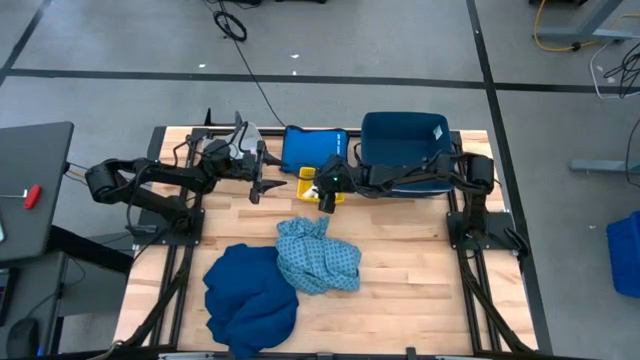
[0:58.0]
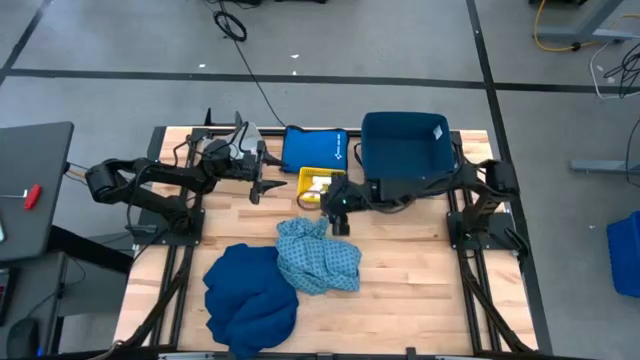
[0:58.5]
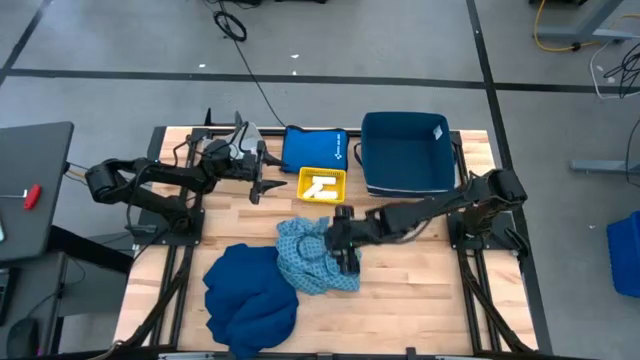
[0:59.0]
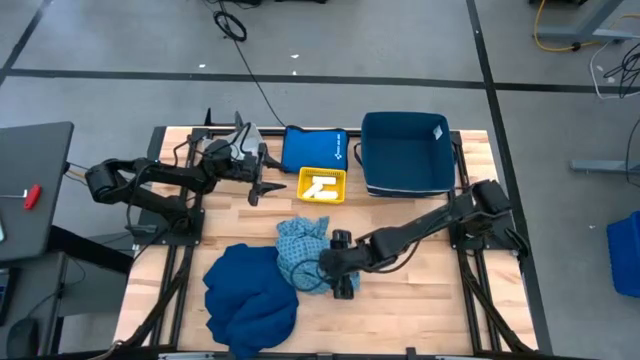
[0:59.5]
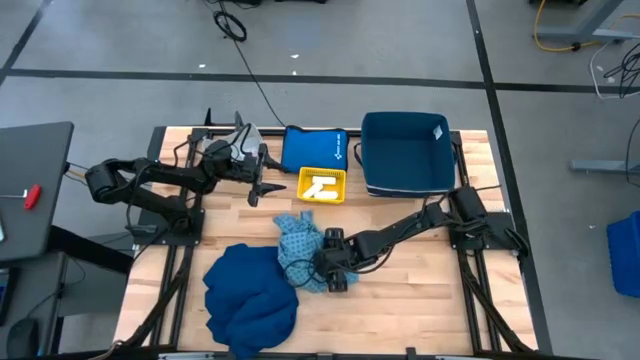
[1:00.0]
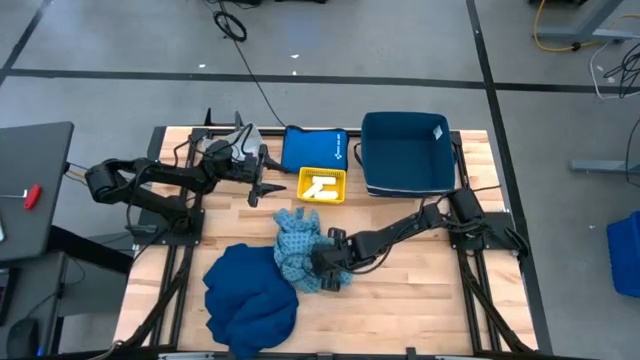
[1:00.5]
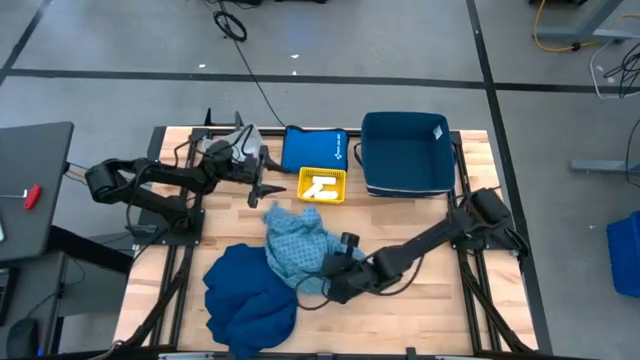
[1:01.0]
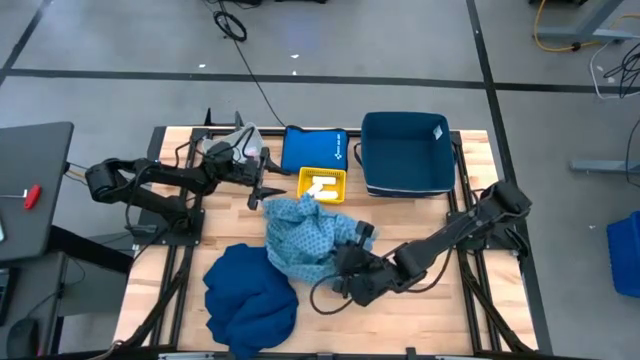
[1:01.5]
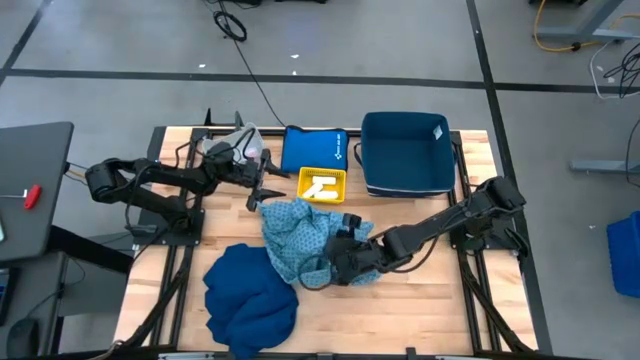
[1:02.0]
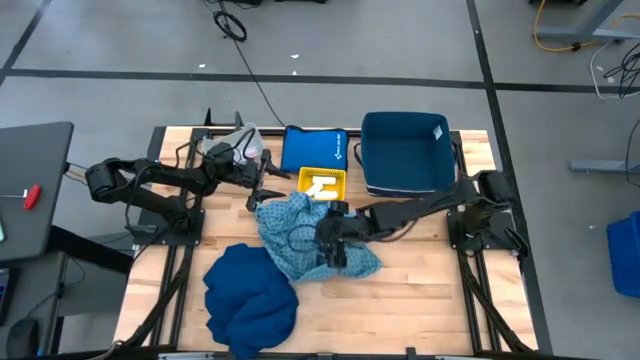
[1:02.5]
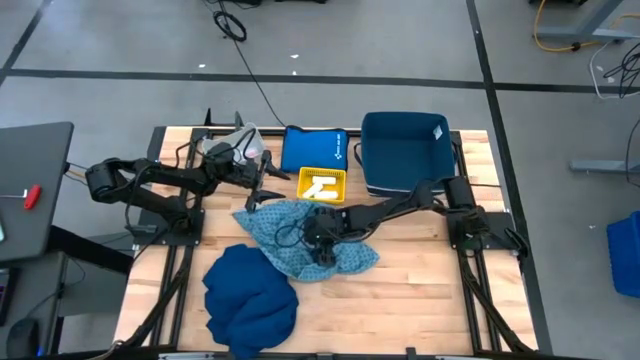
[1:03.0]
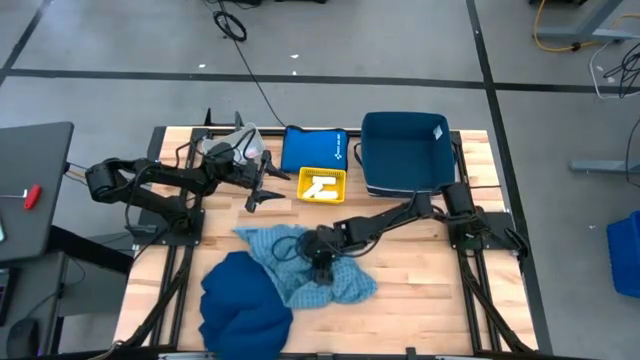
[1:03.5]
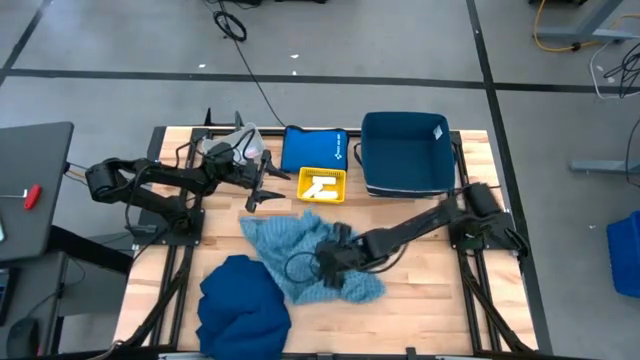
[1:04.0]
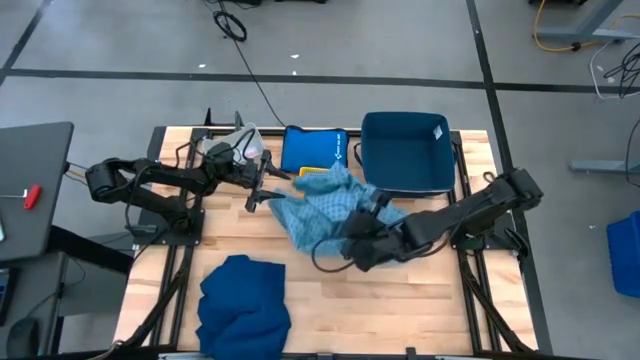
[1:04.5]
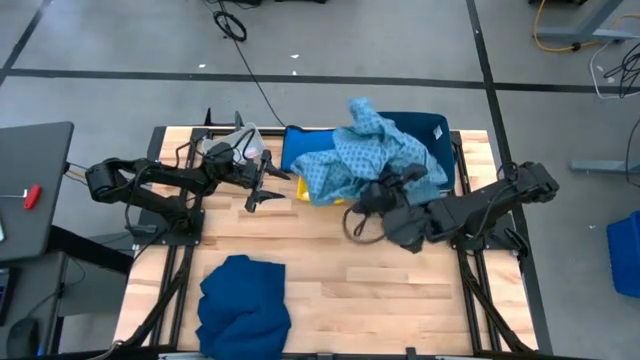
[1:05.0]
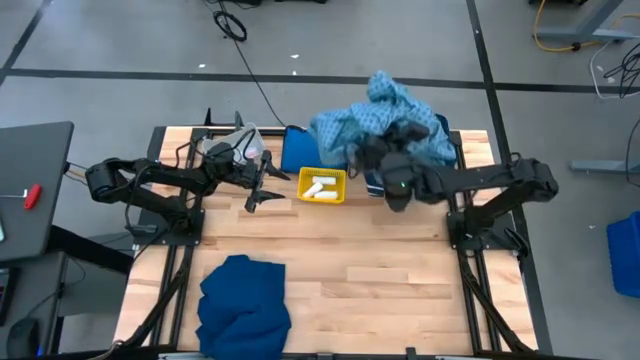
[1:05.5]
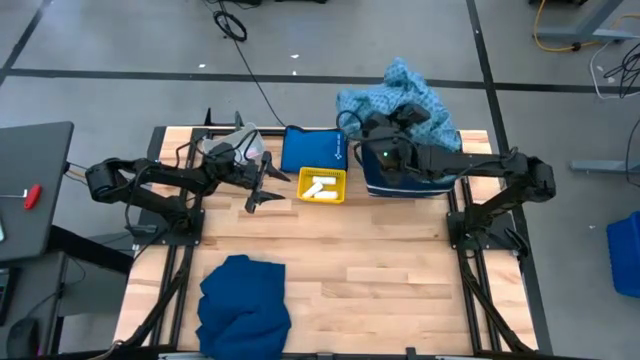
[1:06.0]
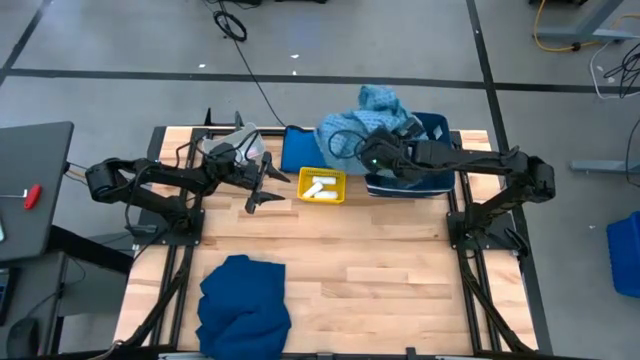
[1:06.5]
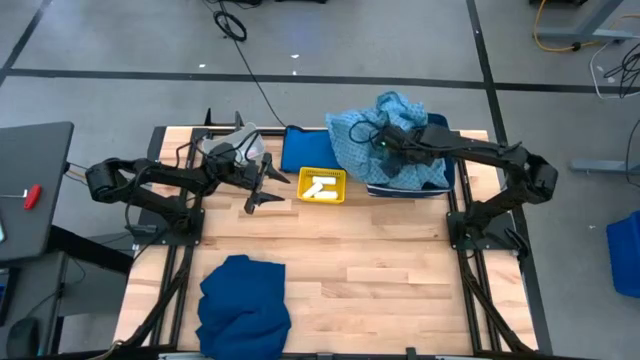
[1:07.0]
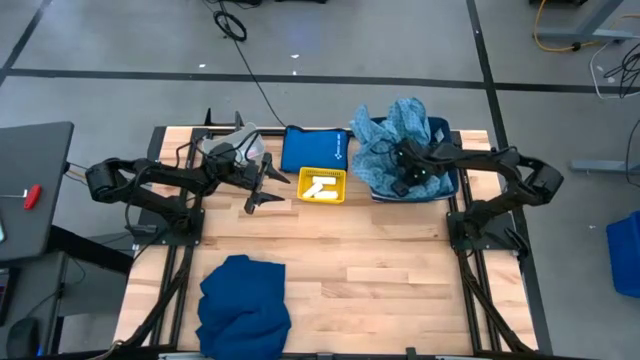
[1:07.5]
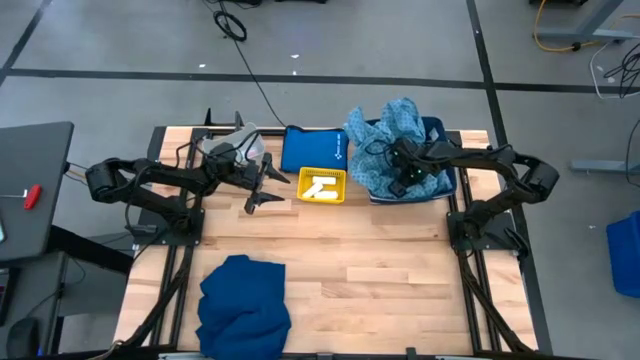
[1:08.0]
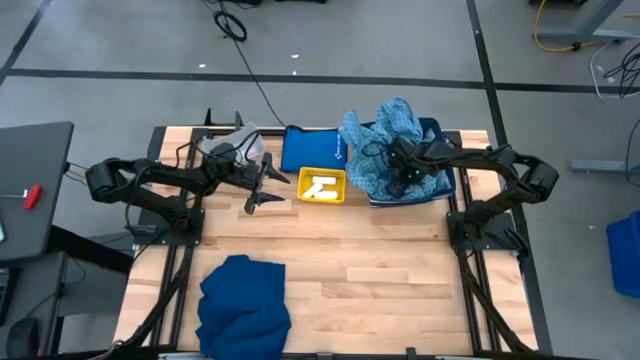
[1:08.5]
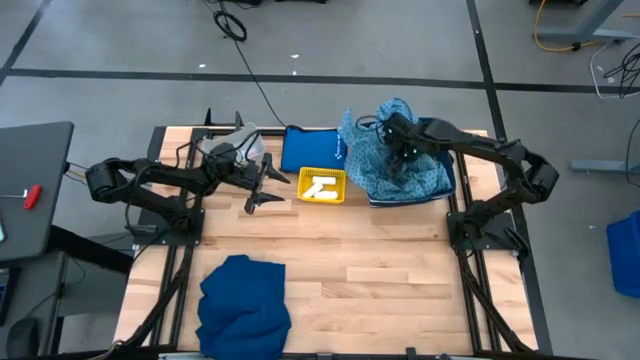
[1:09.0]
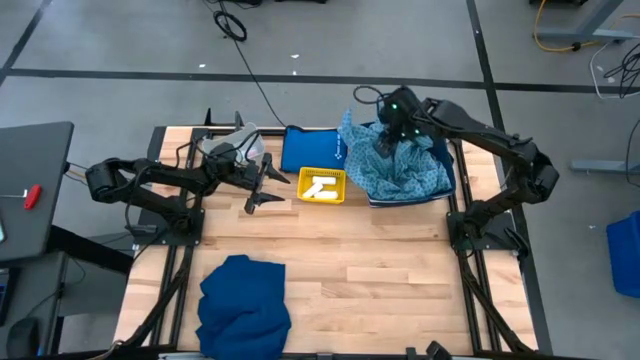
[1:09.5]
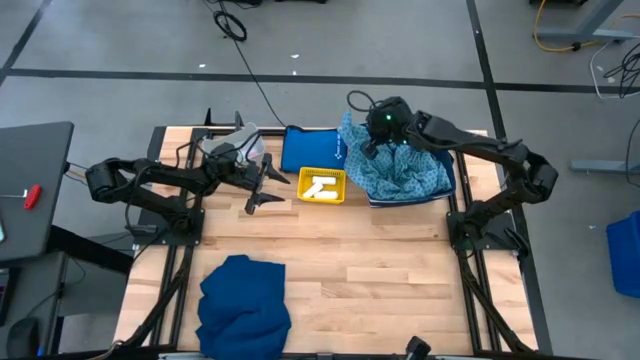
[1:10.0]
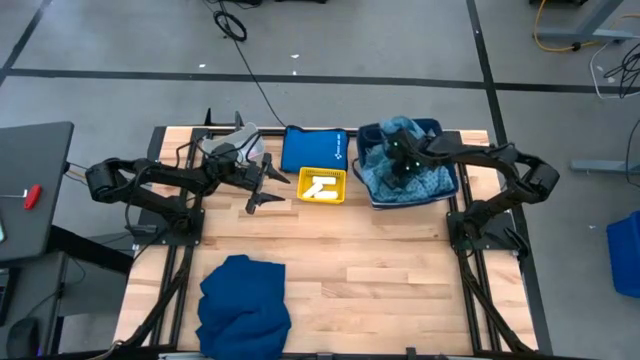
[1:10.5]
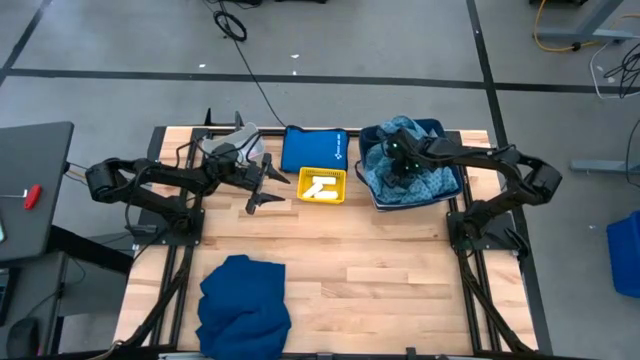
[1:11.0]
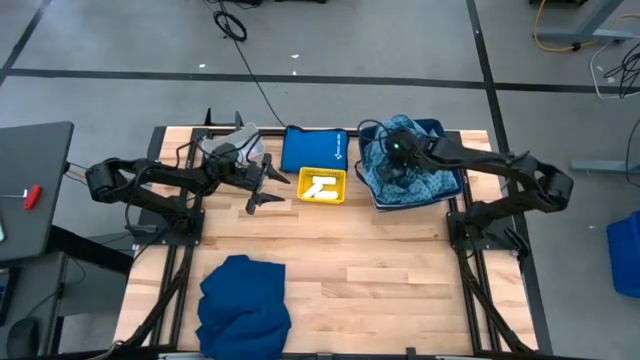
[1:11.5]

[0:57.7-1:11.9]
Task: Pick & place medical supplies in basket/bin
Put the light blue patient gown into the blue bin

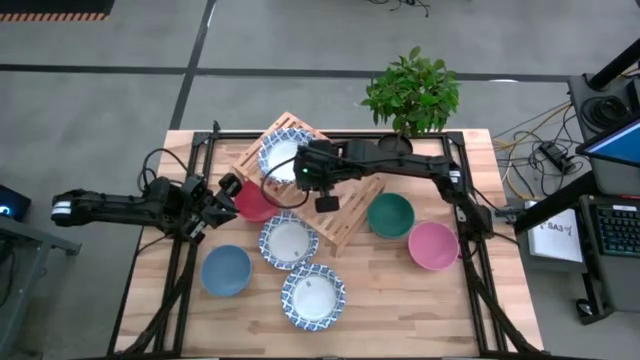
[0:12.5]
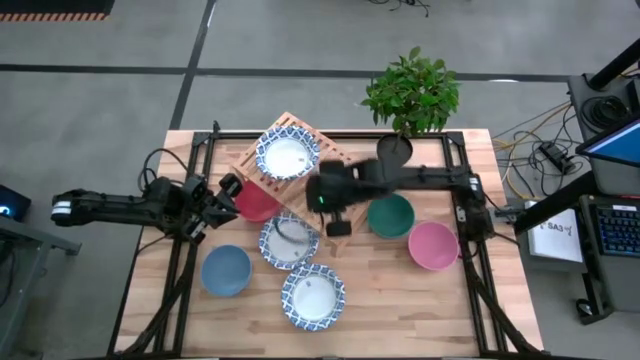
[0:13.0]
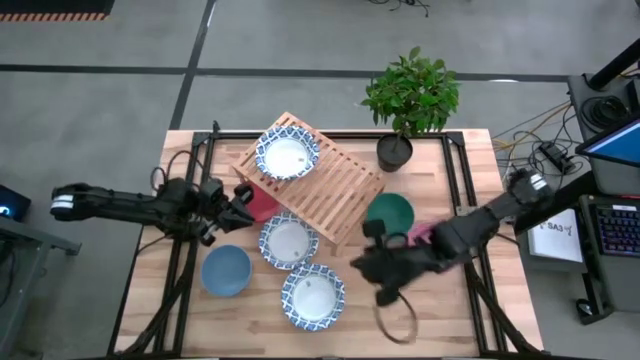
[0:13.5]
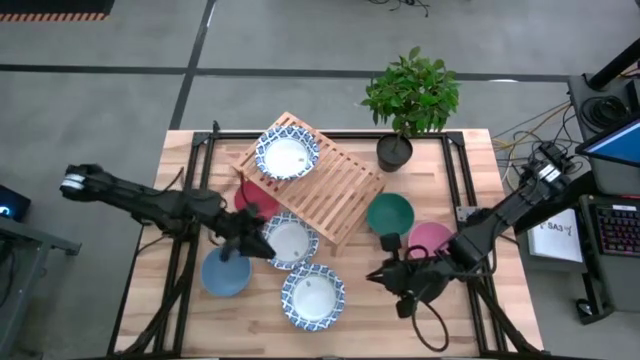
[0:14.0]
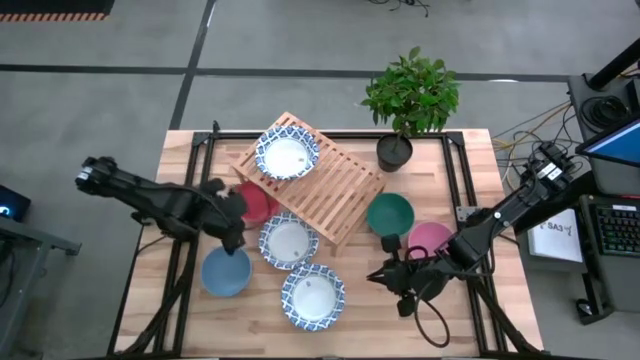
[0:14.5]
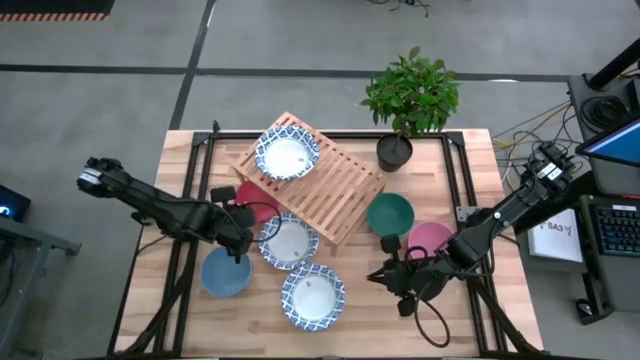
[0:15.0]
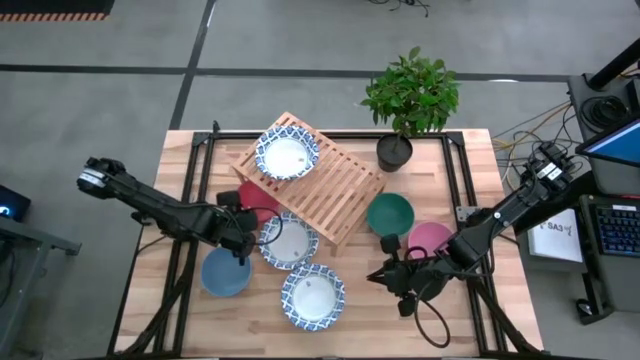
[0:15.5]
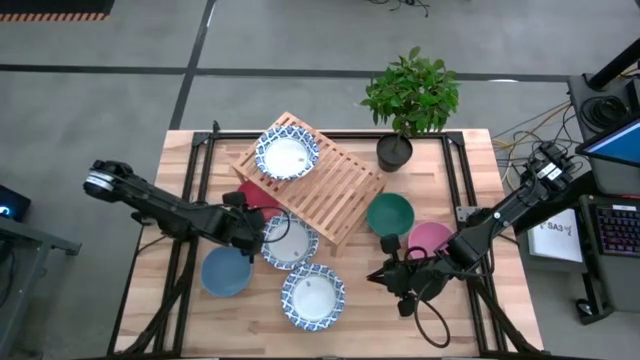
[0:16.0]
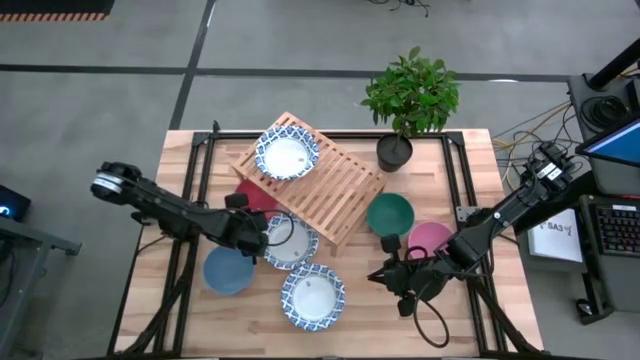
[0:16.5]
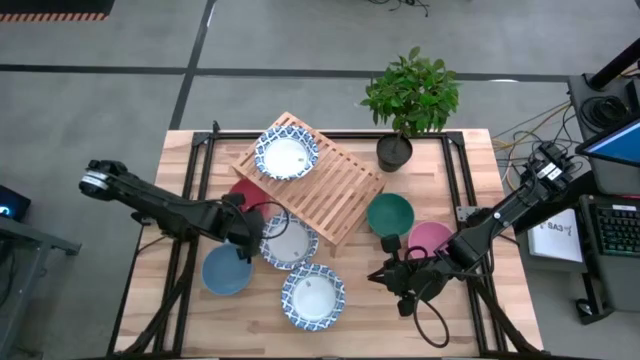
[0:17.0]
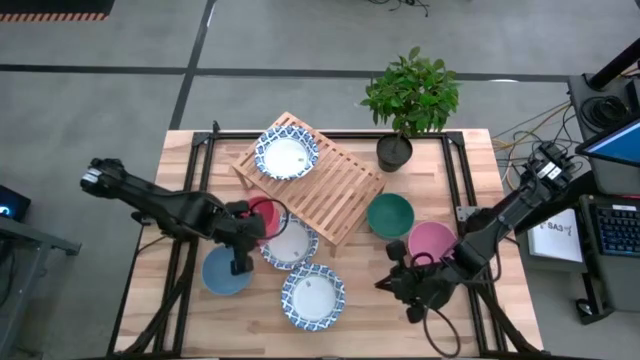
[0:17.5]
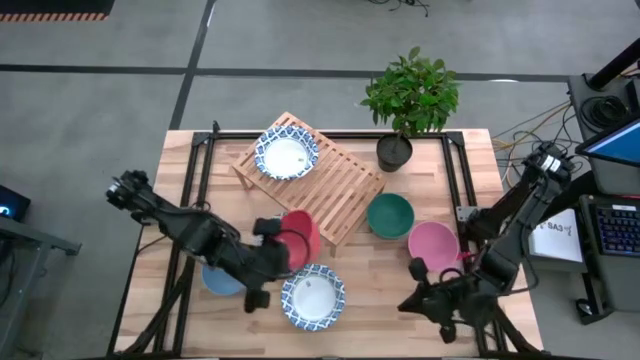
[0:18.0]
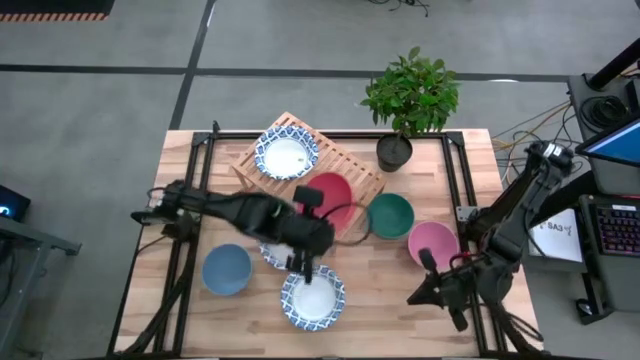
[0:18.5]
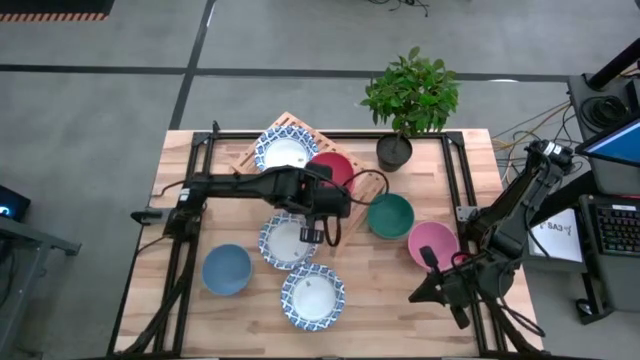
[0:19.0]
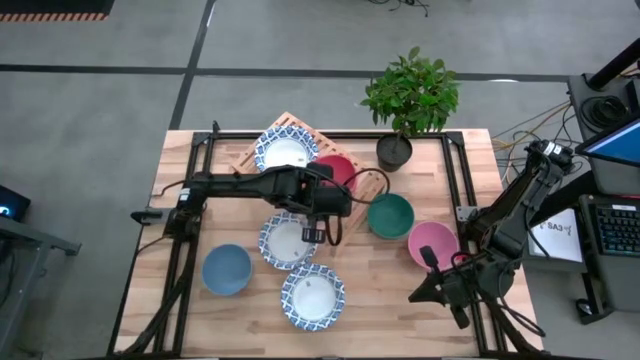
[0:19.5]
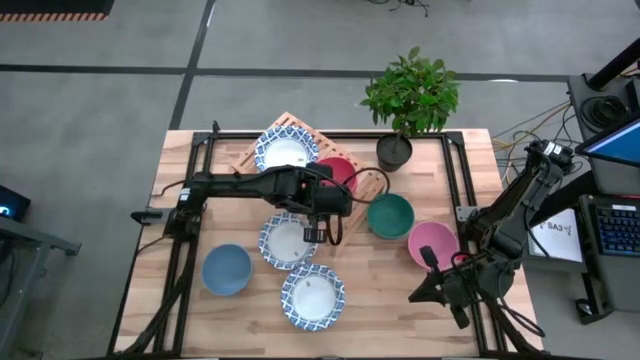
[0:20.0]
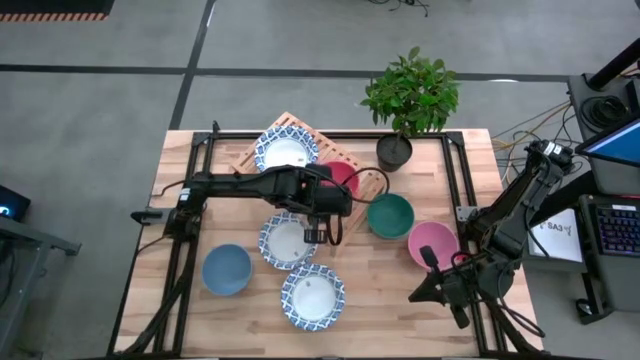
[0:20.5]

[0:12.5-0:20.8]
Task: Place and stack bowls onto a shelf
Put the red bowl on the shelf
